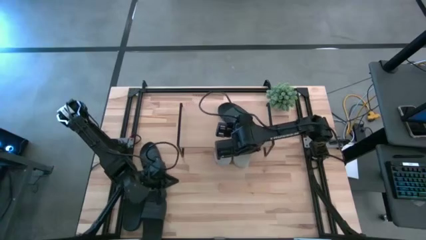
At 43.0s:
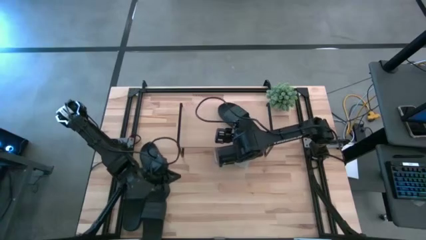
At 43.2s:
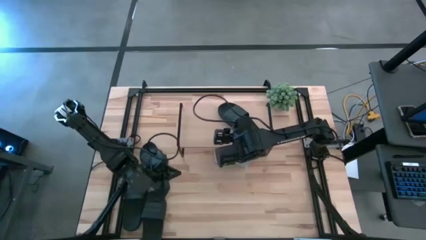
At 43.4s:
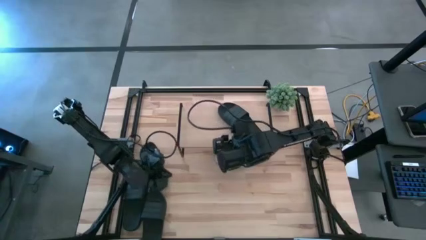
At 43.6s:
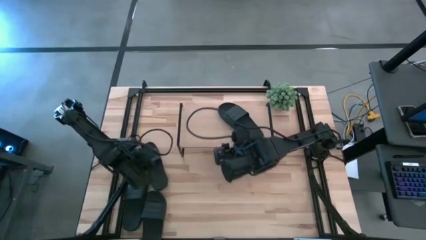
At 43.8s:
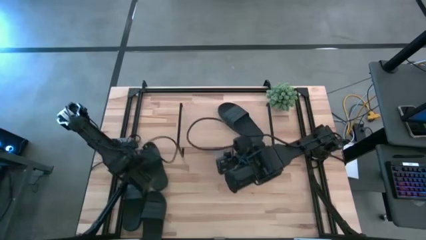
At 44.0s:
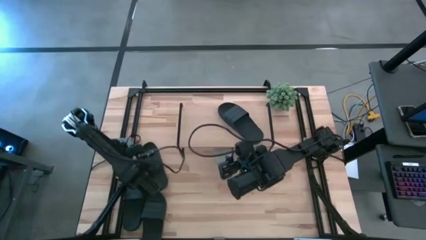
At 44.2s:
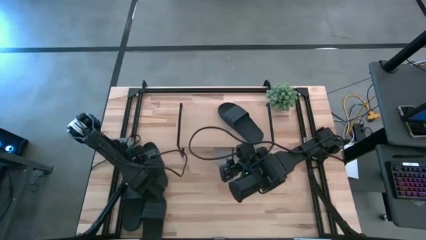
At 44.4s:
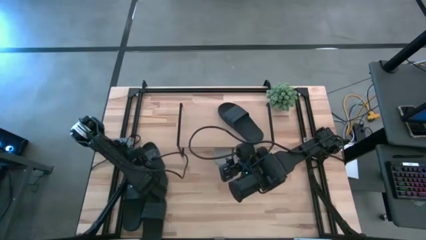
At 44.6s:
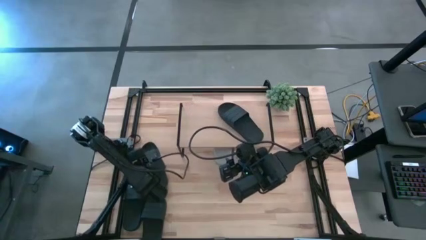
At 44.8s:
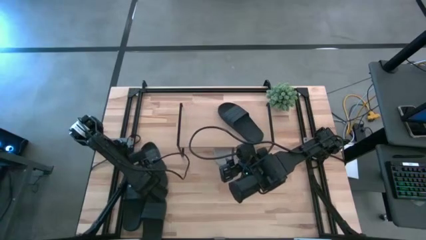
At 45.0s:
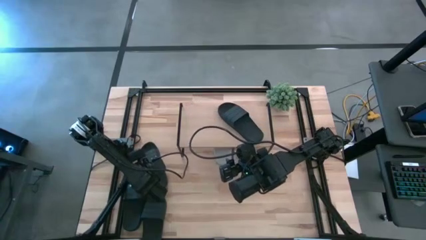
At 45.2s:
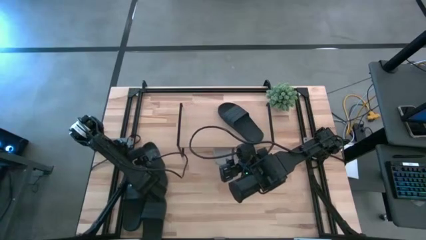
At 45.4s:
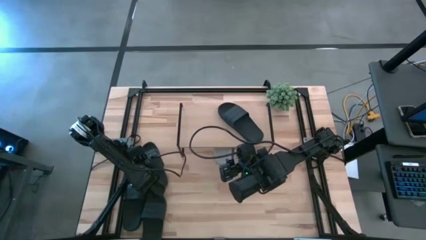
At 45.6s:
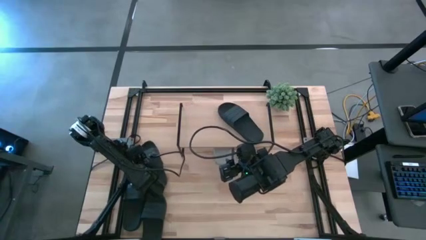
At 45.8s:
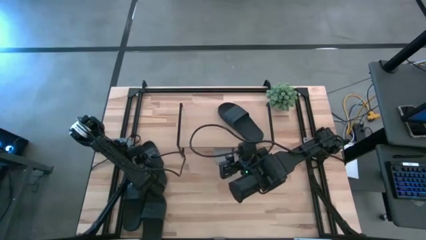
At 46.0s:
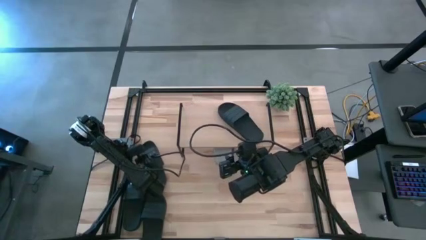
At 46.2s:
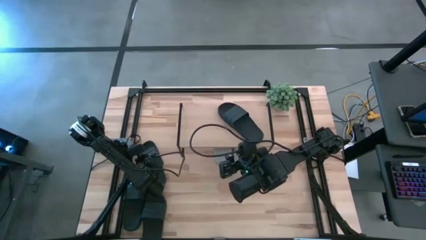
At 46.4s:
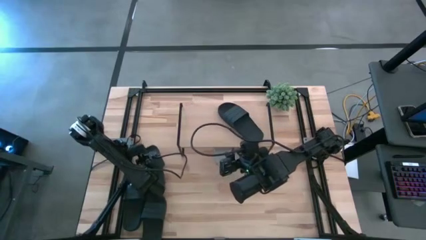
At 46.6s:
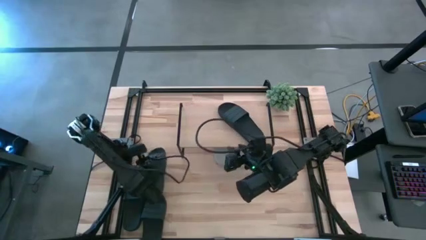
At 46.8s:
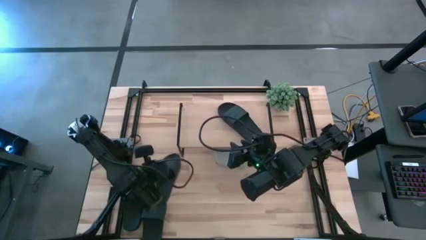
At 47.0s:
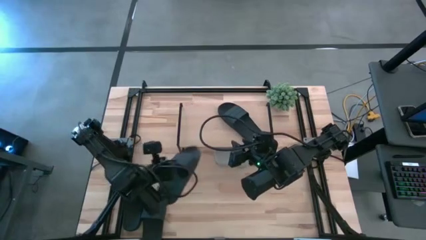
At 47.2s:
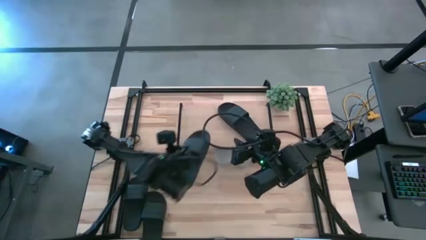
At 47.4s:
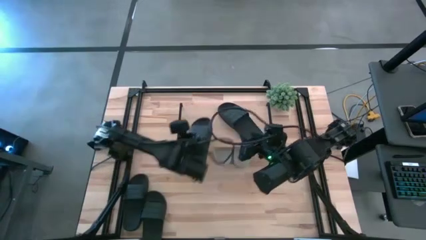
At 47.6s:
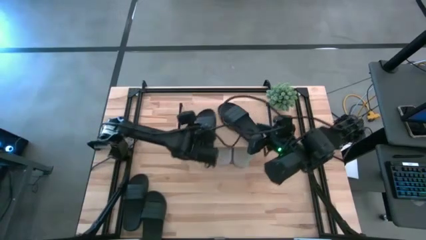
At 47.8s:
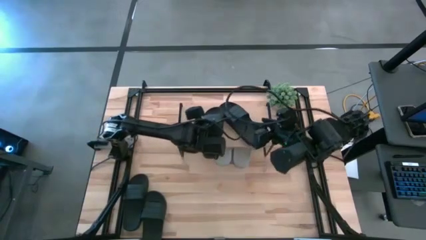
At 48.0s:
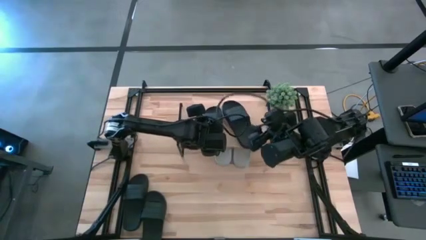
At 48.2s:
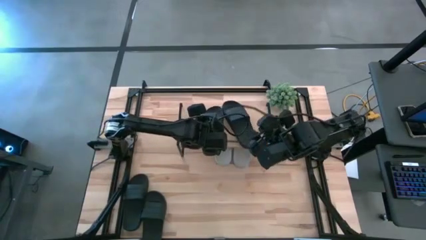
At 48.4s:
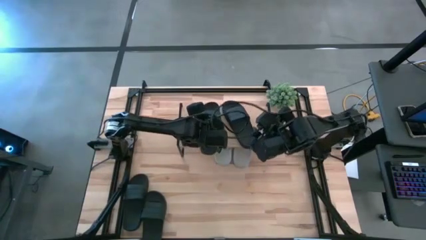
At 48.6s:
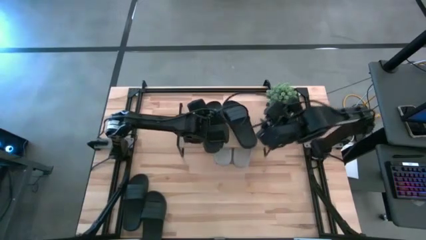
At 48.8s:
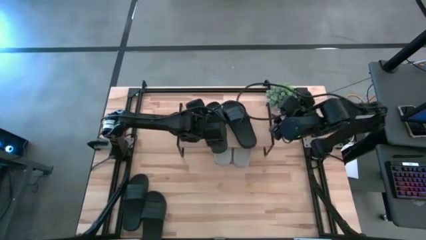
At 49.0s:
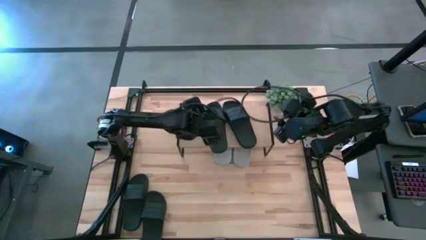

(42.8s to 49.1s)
Task: Pick and place slides into the shelf
Put the black slipper on the shelf

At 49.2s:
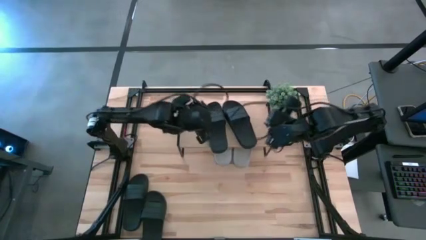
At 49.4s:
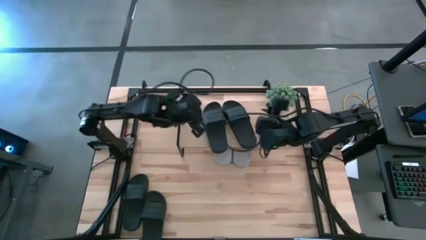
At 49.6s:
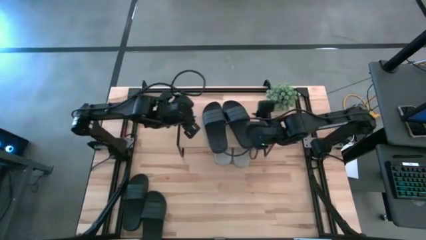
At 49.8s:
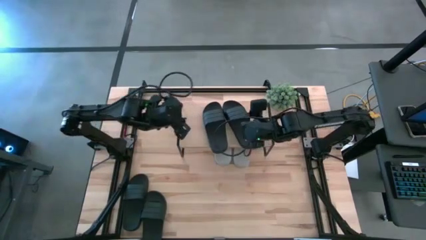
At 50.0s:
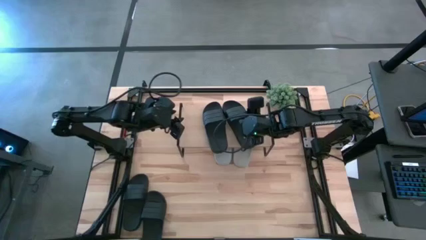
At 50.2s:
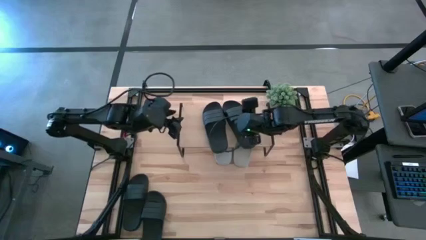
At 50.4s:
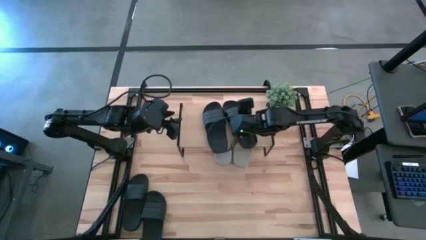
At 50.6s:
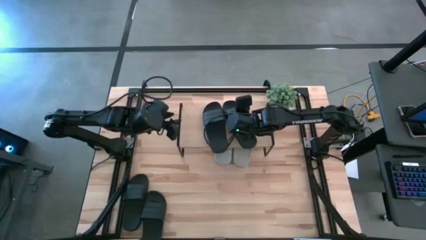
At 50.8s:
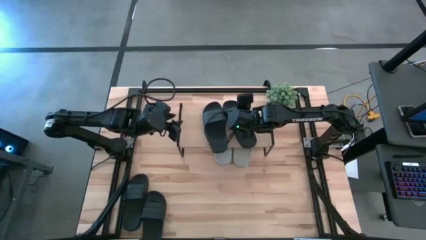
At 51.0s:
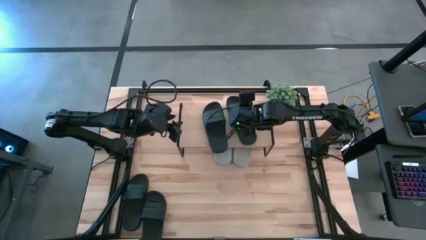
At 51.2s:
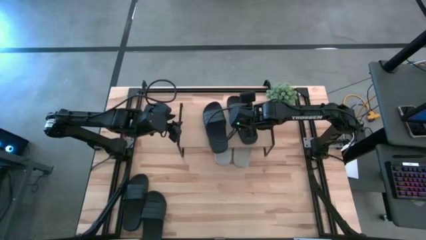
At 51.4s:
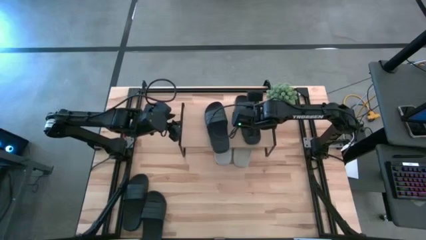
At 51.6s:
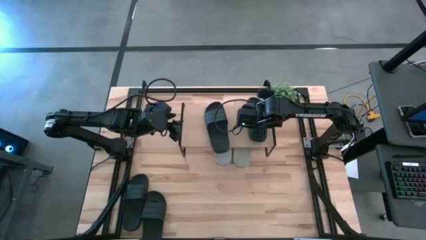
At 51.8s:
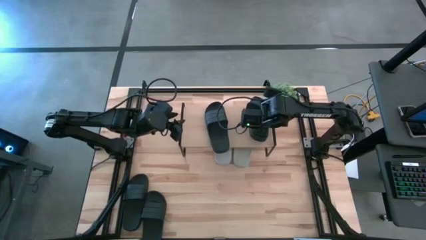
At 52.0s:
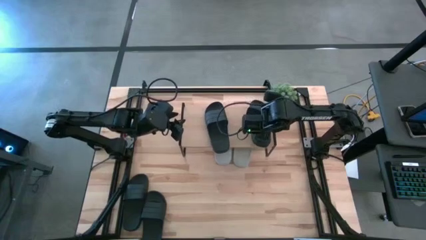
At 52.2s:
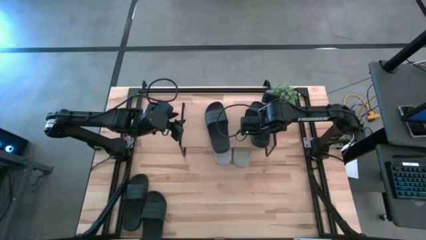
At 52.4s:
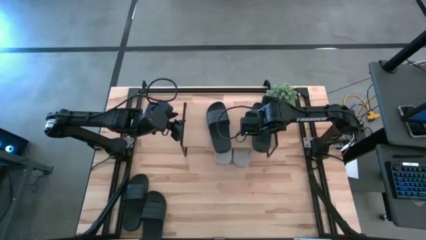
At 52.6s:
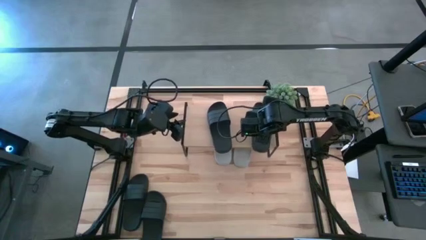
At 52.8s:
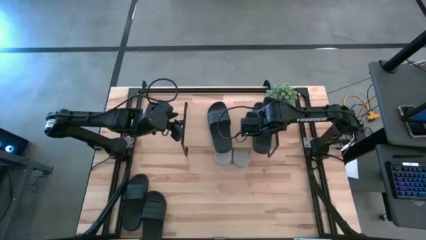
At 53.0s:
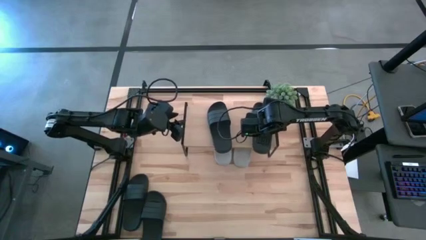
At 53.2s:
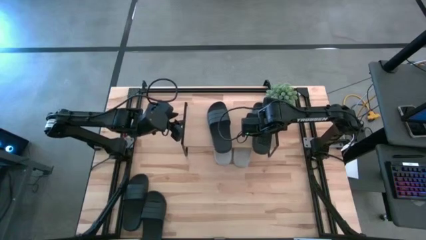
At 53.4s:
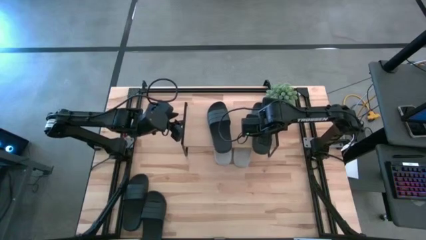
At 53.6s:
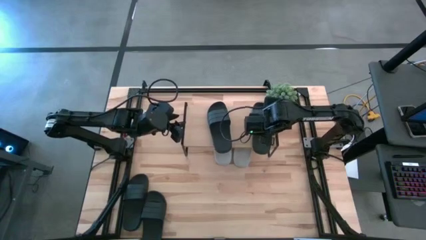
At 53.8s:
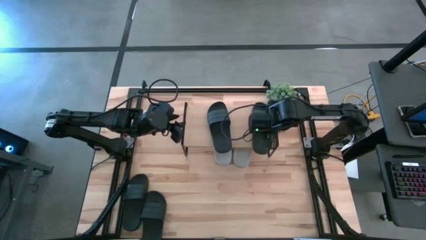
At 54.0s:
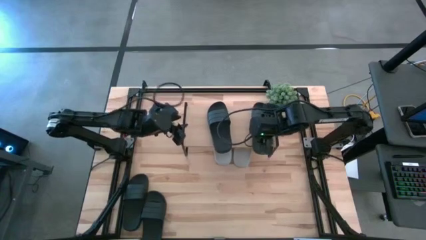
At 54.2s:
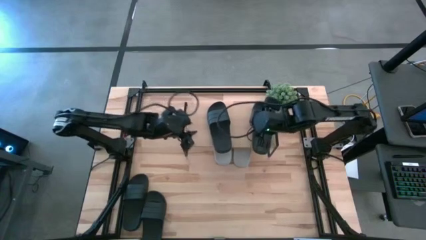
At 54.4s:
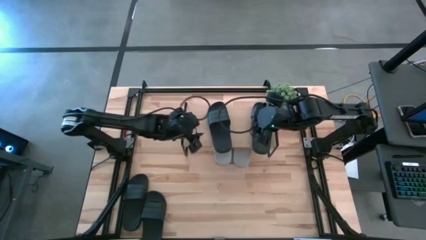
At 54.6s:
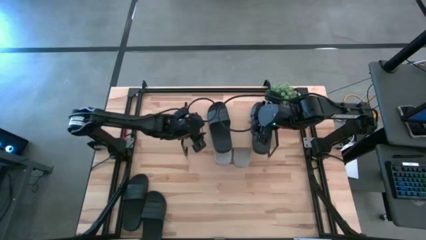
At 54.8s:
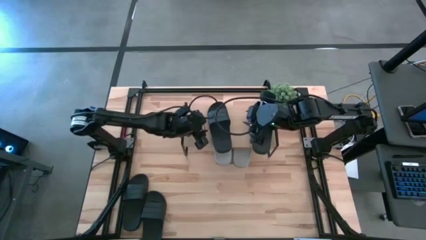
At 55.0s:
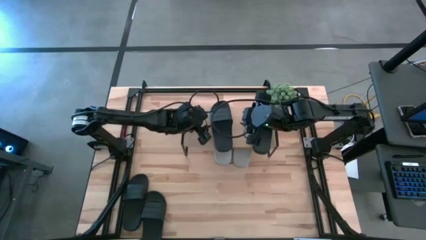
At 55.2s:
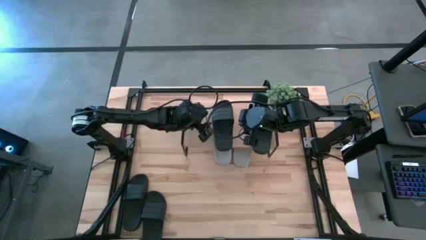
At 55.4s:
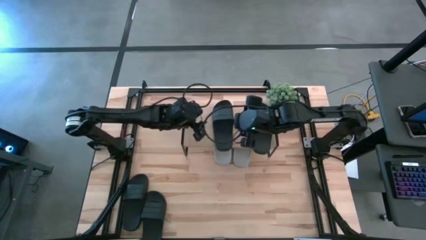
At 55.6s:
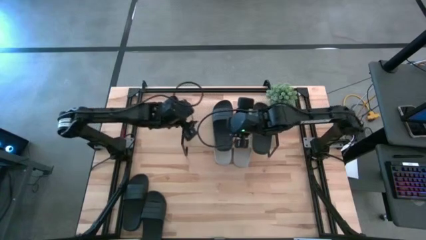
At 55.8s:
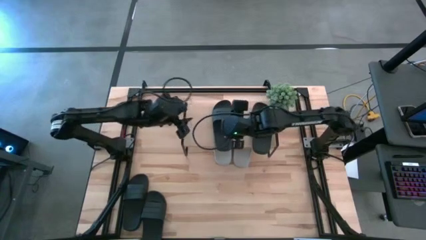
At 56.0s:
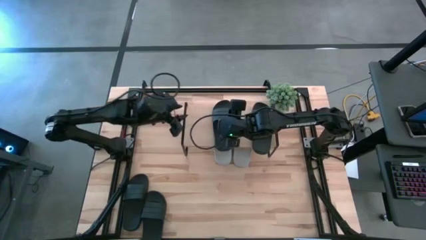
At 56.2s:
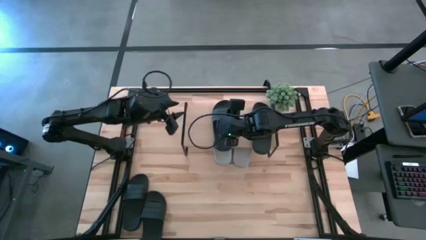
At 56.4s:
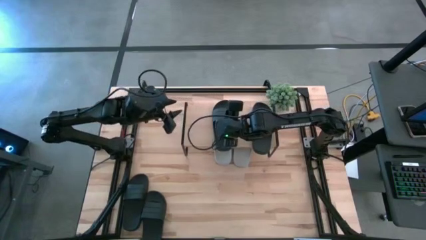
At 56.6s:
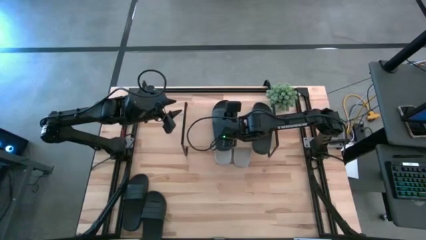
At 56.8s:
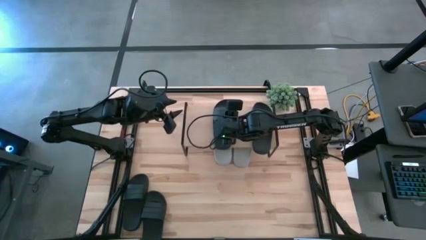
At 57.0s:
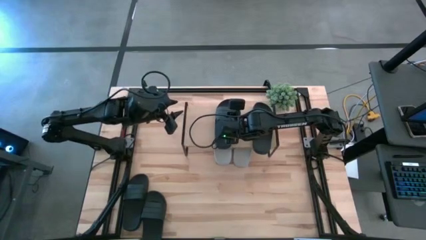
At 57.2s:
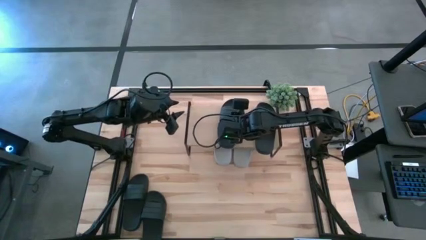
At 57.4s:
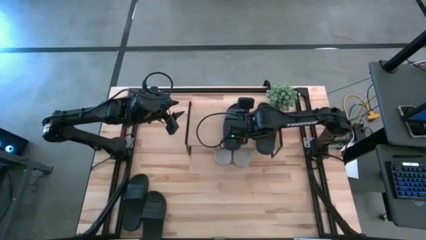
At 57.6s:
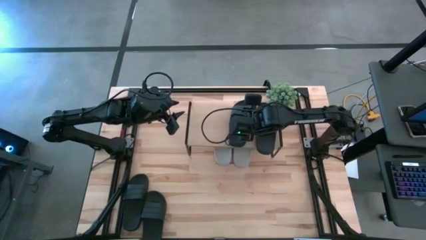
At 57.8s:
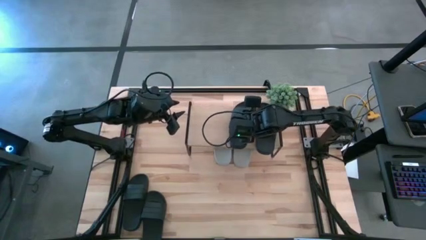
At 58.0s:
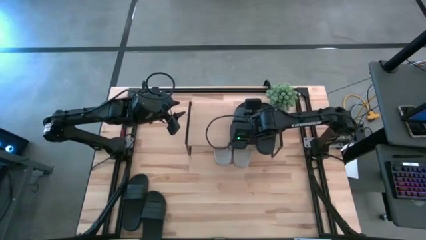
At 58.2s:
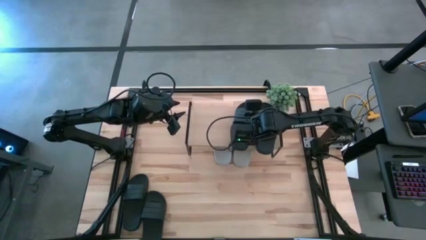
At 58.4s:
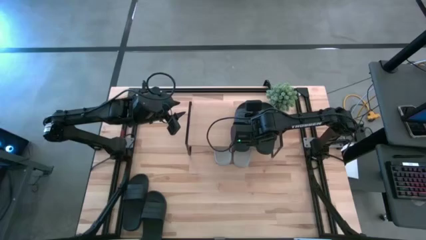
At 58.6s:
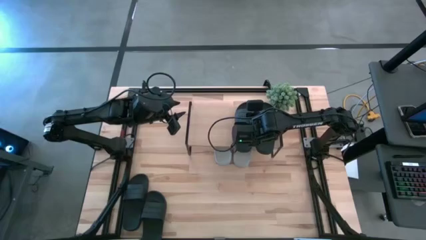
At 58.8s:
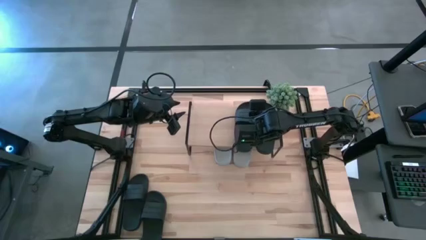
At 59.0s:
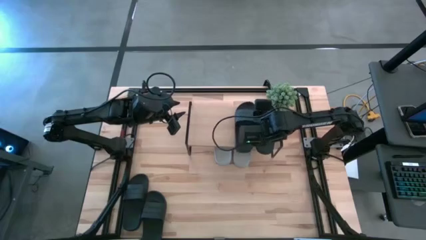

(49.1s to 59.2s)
Adjust the black slippers on the shelf
